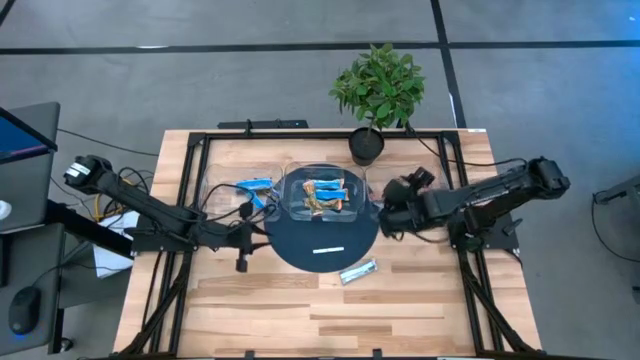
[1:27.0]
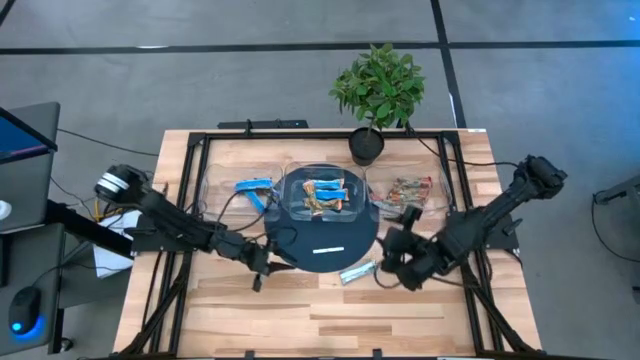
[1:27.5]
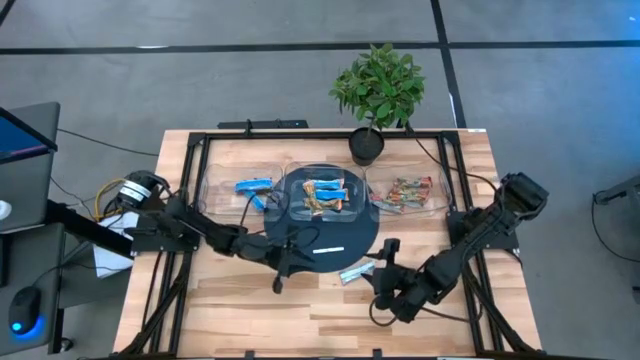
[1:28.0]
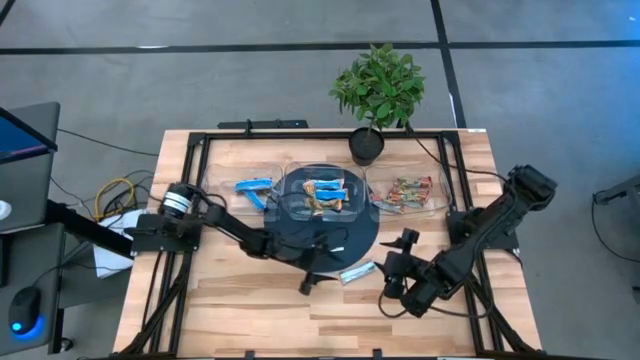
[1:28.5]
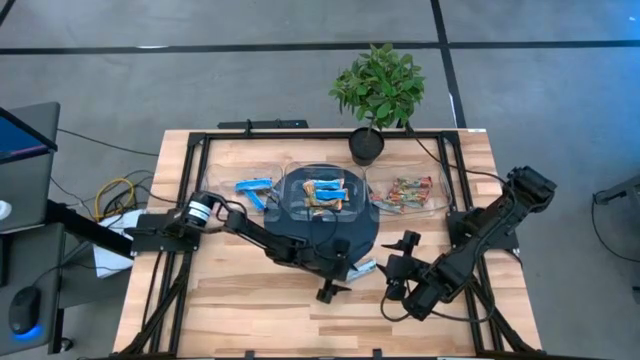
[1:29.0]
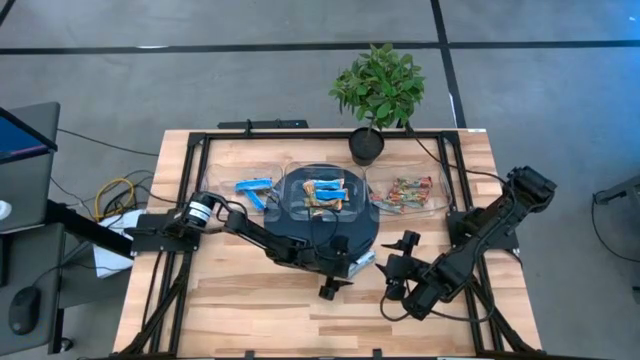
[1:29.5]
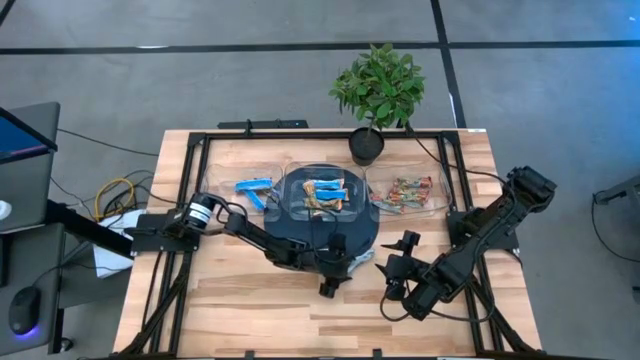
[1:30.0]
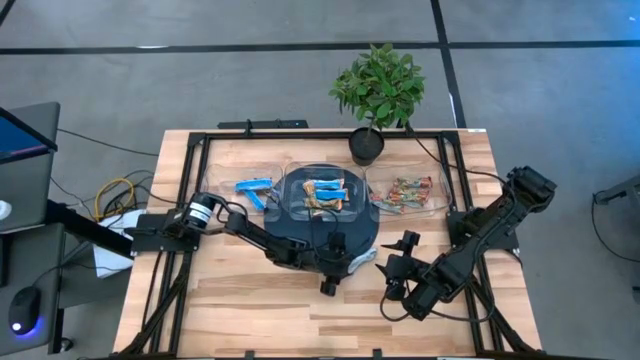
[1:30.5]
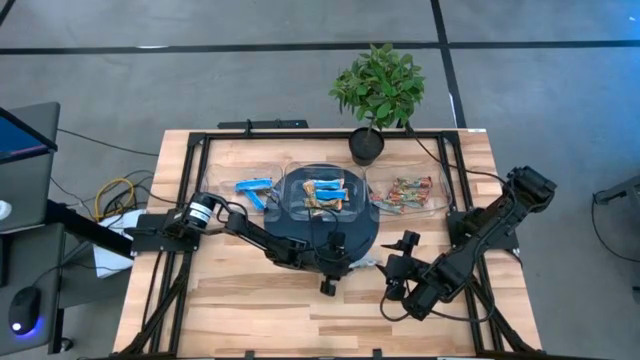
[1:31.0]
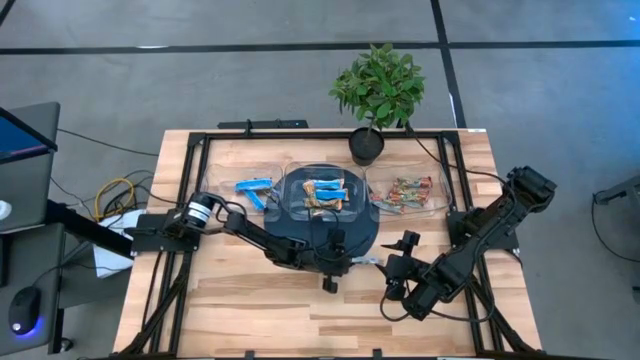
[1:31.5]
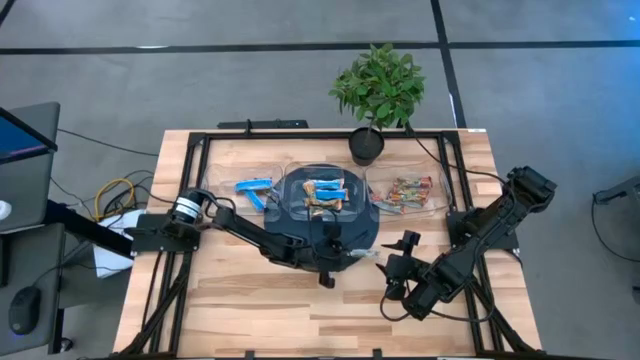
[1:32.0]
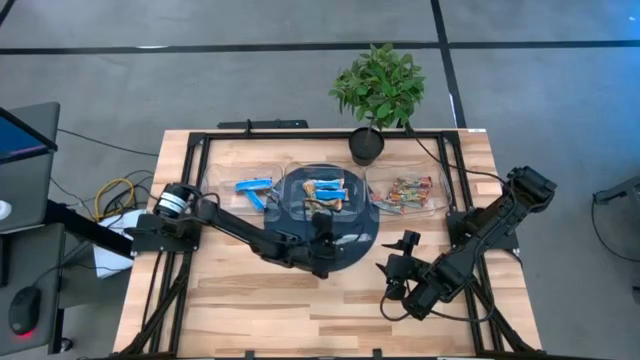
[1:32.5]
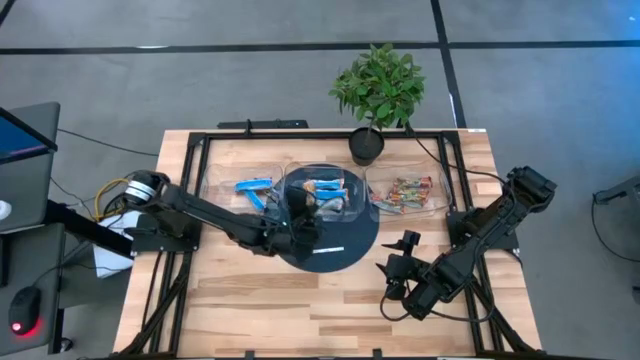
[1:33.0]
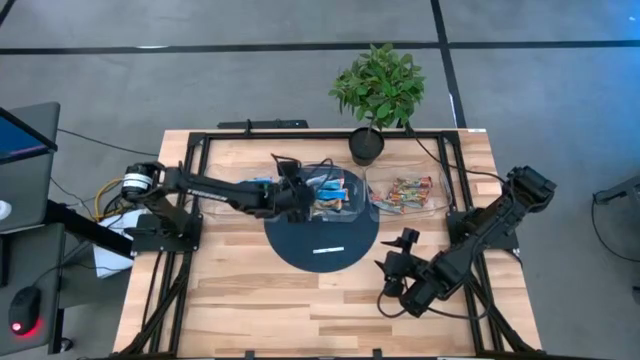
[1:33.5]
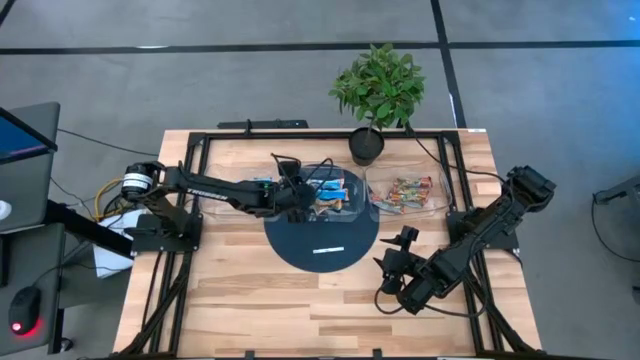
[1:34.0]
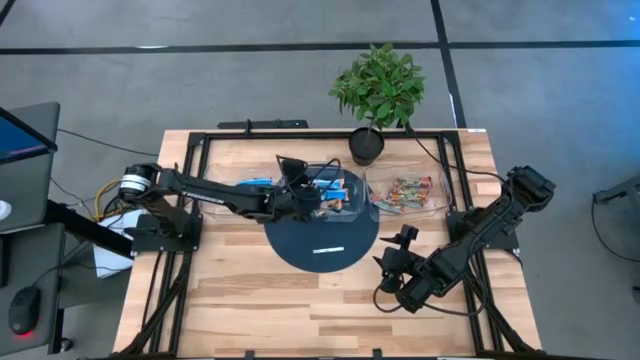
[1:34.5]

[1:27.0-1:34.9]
Task: Pick and place Granola Bars by type
Put the orange snack bar into the middle transparent bin

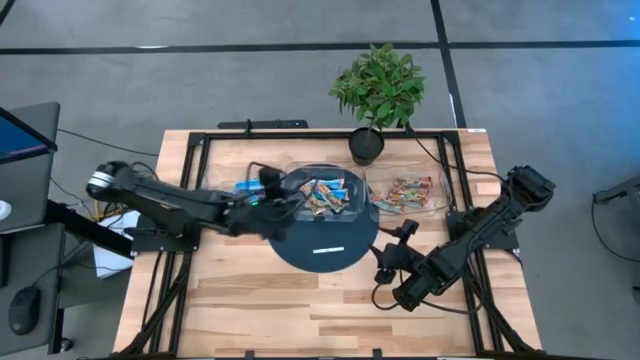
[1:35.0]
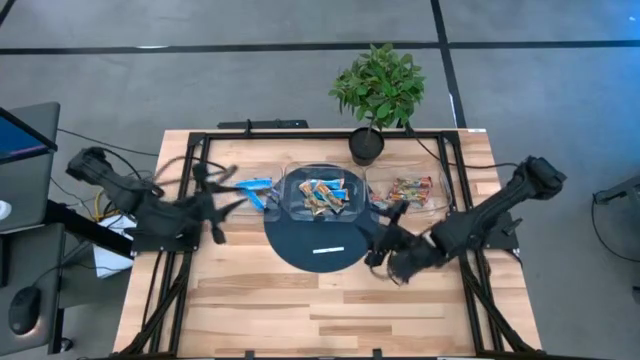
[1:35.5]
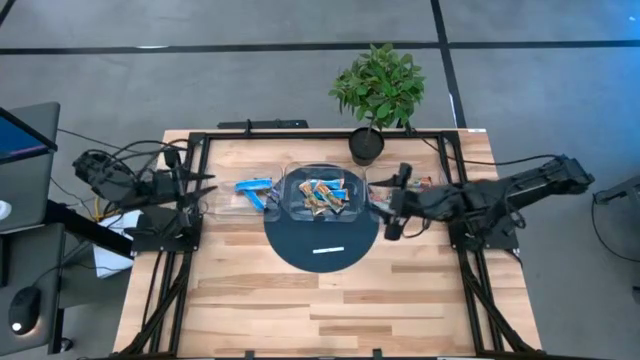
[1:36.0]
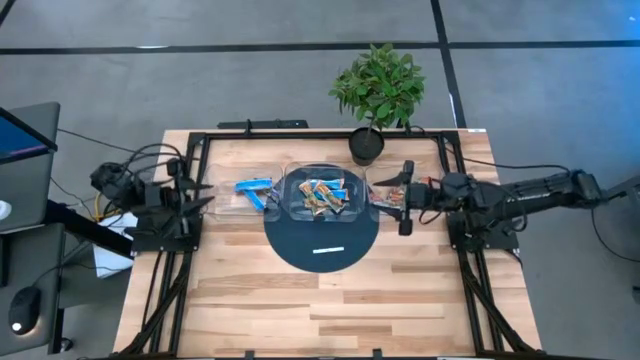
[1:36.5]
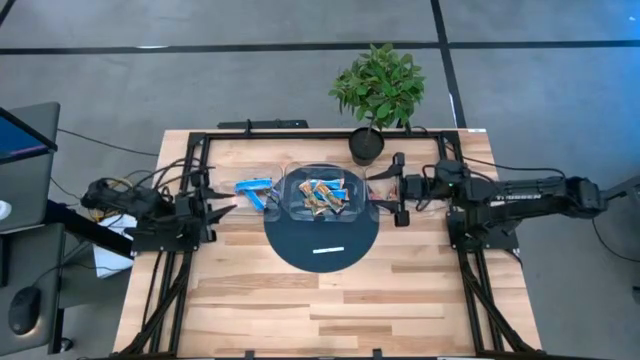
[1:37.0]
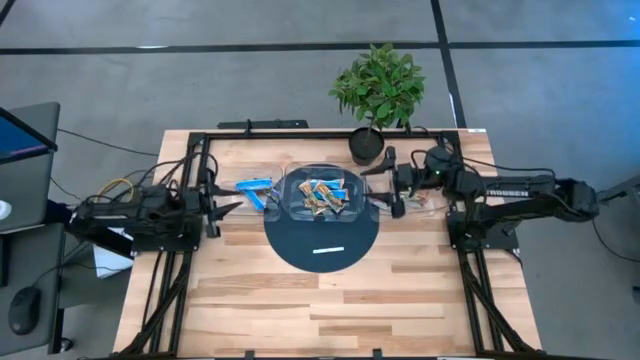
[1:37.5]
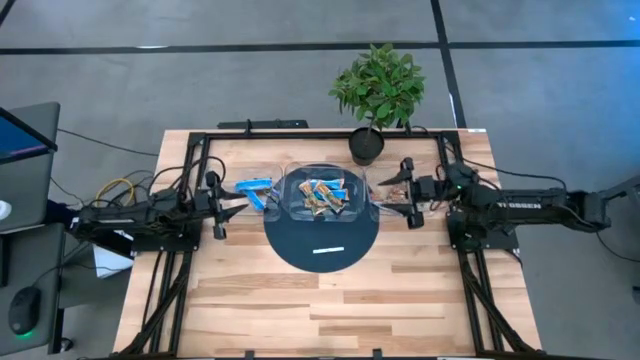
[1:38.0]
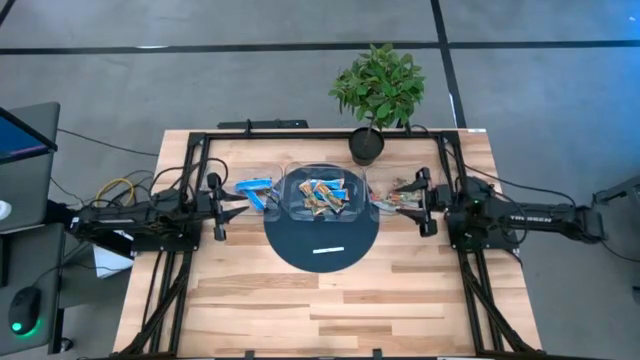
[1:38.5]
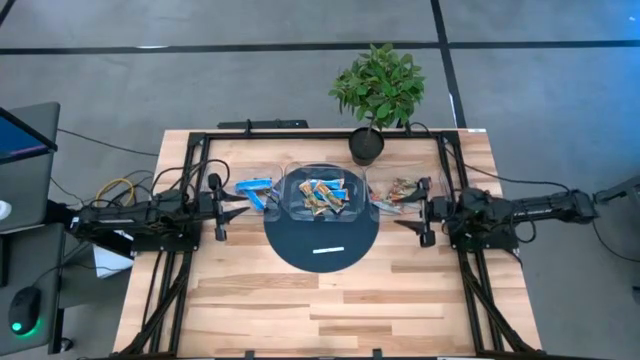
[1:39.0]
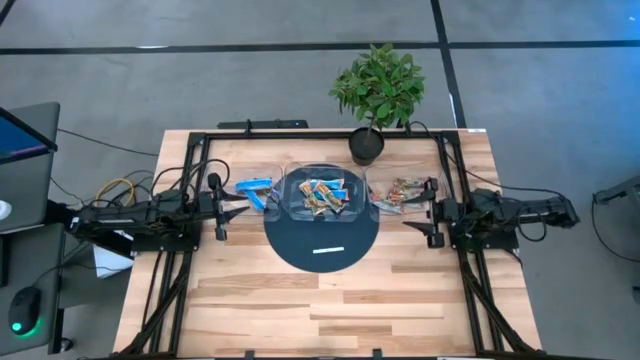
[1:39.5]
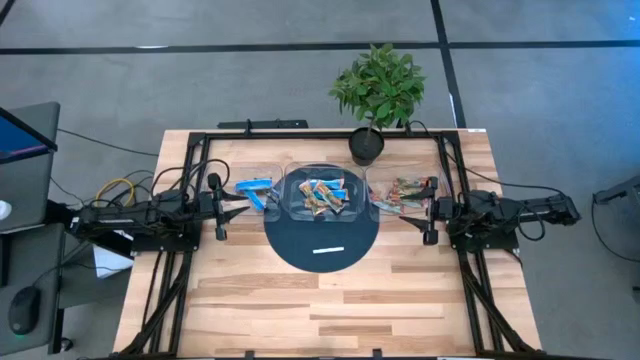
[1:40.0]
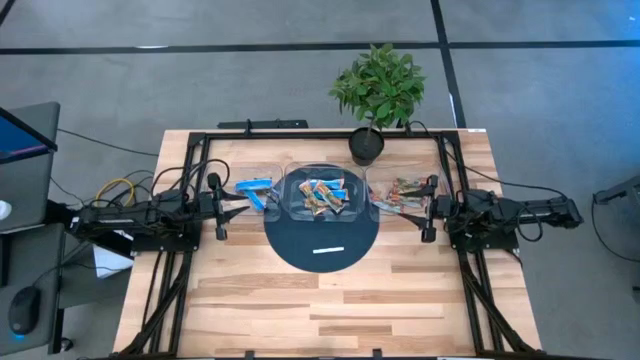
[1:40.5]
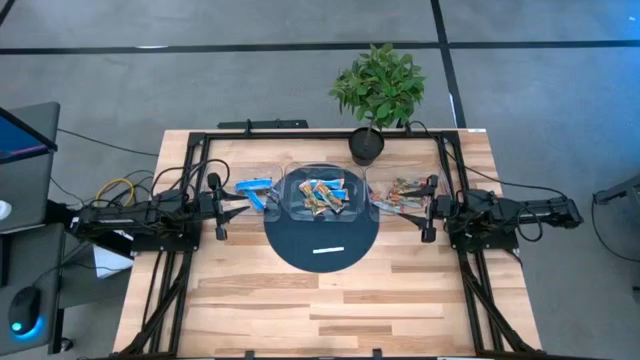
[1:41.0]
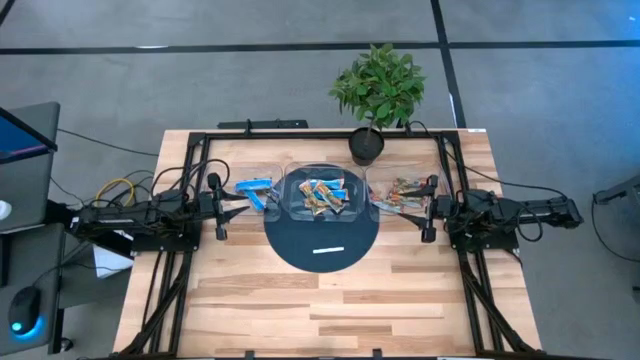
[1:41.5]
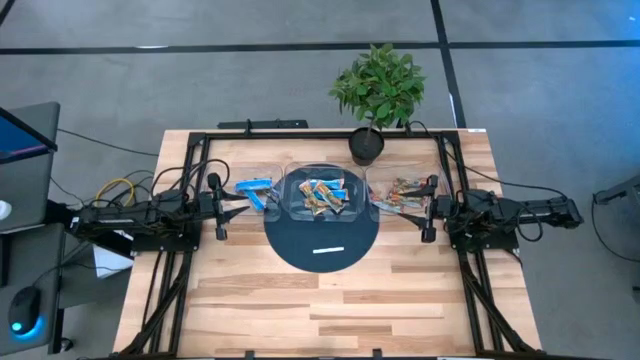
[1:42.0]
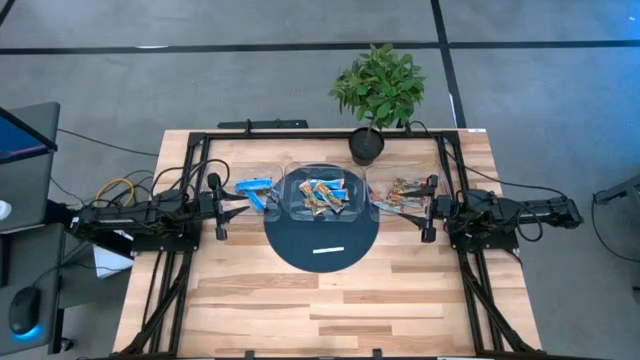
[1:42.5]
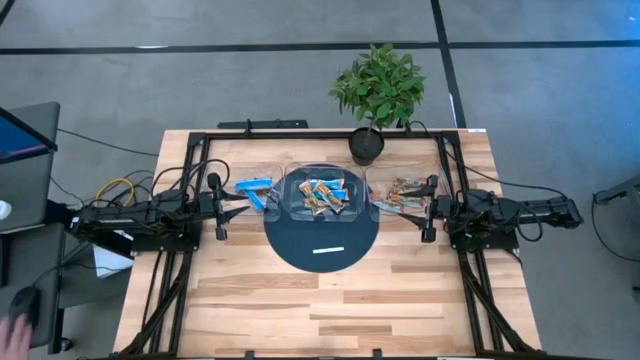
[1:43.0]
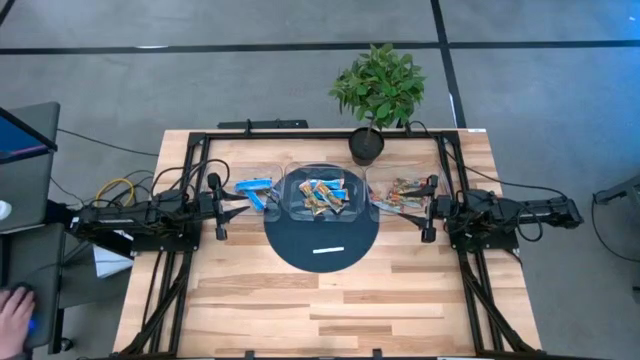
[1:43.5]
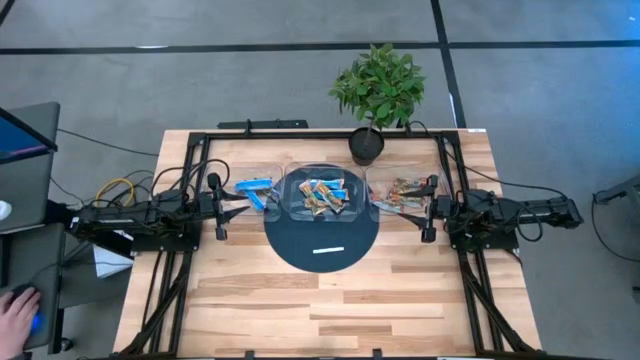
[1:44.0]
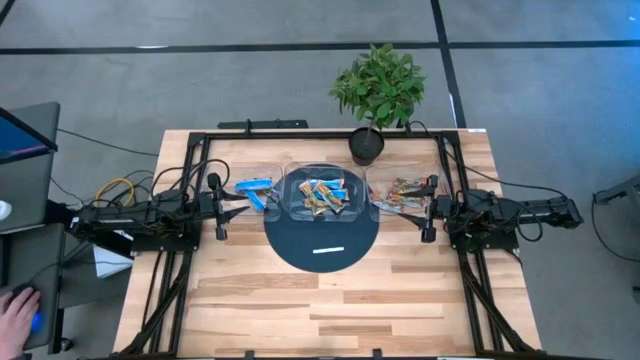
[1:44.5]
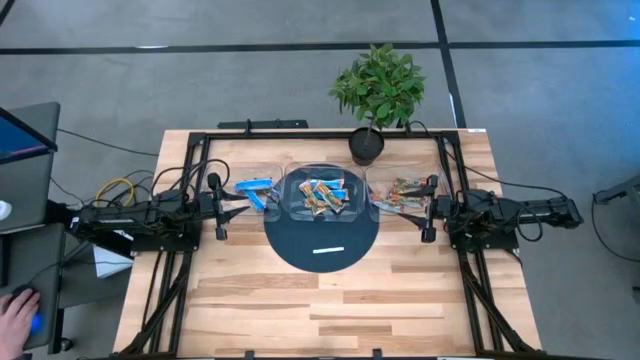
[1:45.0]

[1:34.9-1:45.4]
Return to Home Position

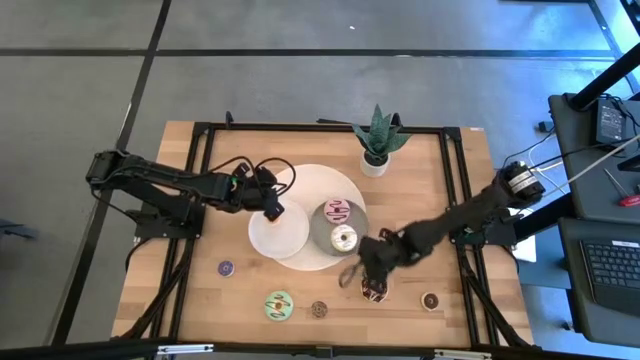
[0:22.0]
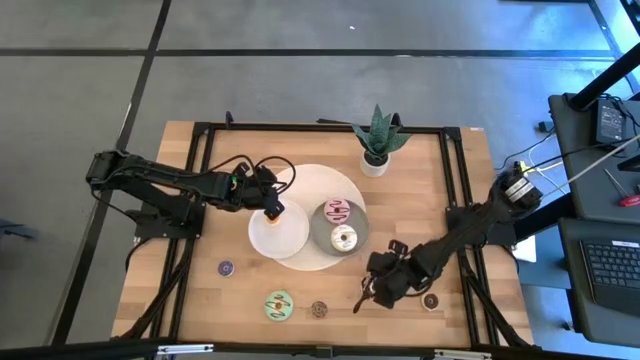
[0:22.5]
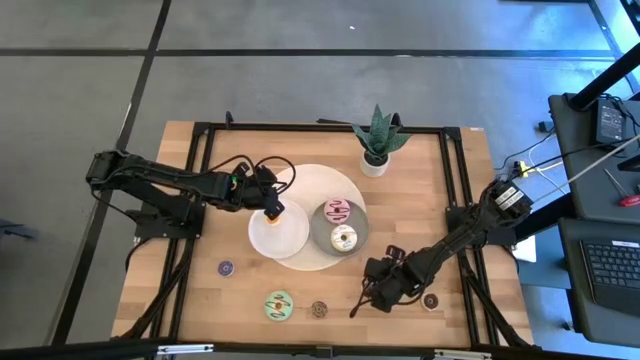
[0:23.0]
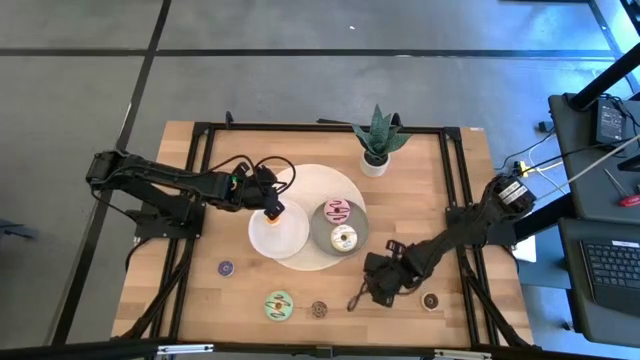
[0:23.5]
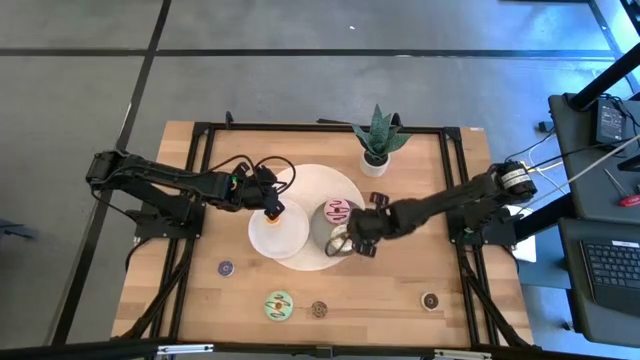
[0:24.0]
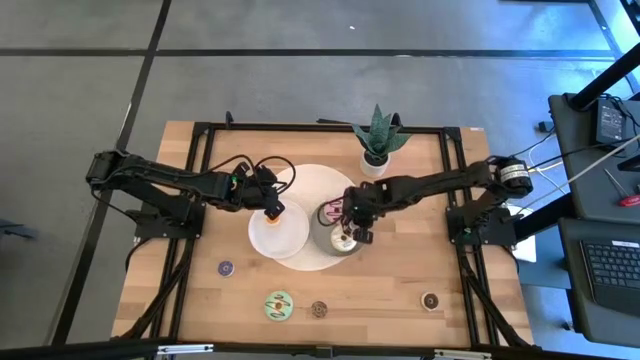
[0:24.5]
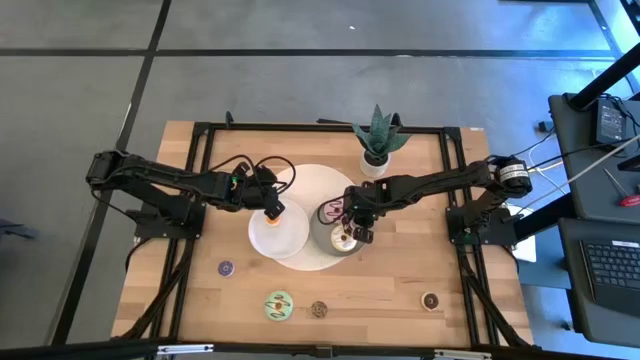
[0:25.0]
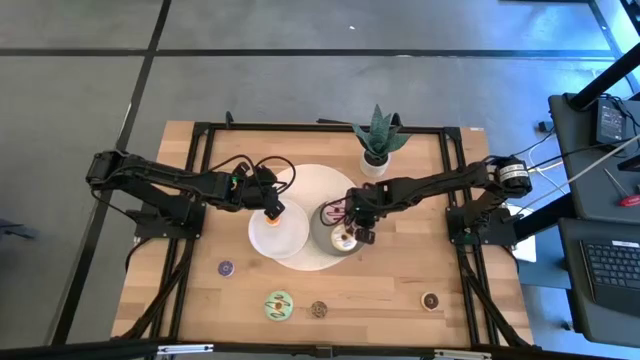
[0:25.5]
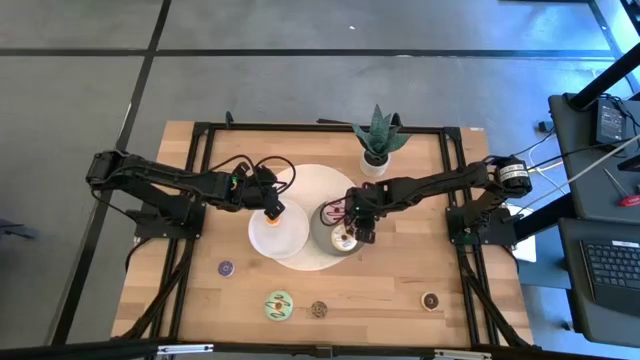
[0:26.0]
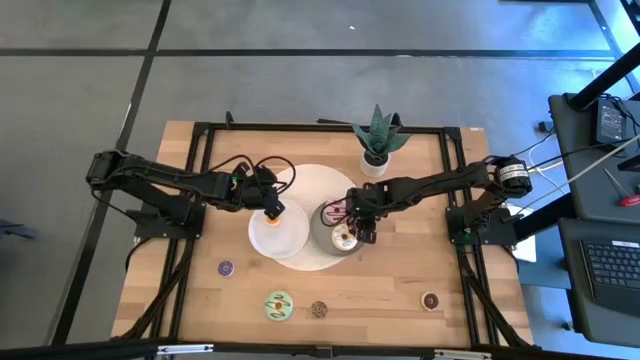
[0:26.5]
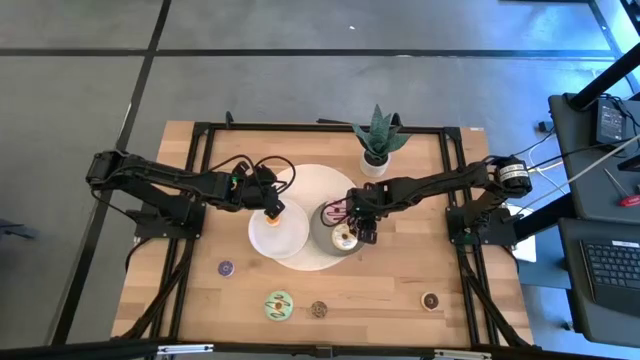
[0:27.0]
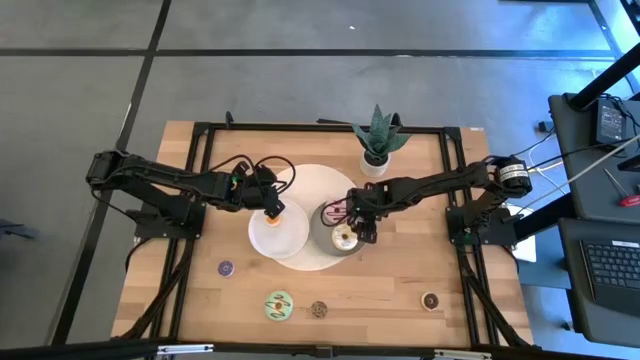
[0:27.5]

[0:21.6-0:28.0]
Task: Pick & Place donuts
Put the large black donut on the gray plate
